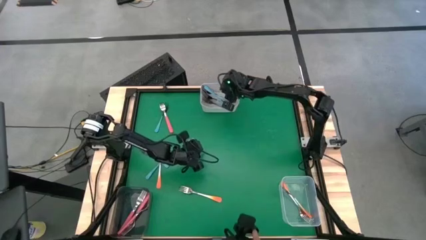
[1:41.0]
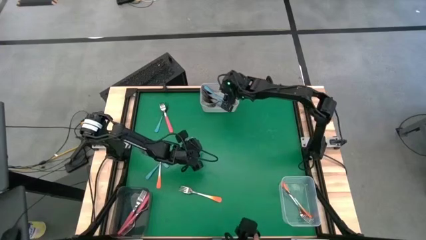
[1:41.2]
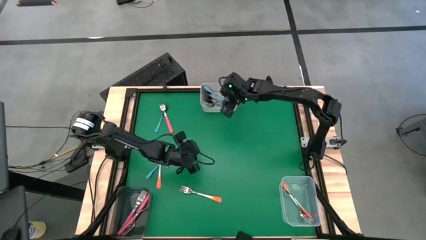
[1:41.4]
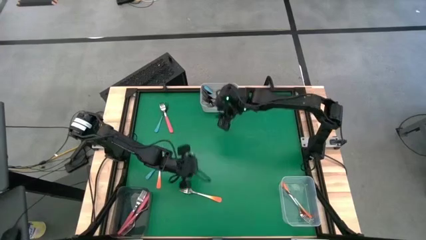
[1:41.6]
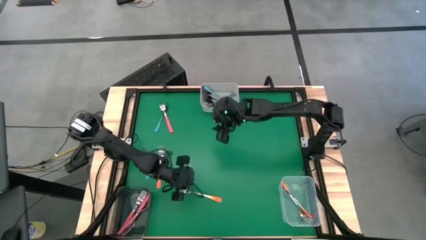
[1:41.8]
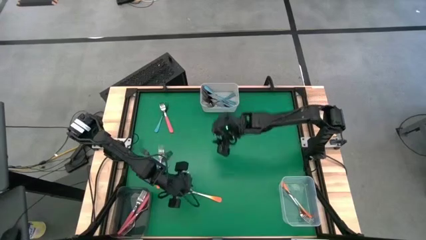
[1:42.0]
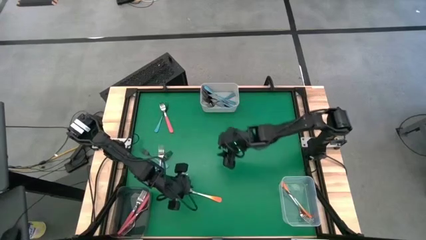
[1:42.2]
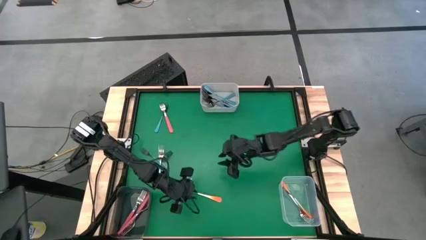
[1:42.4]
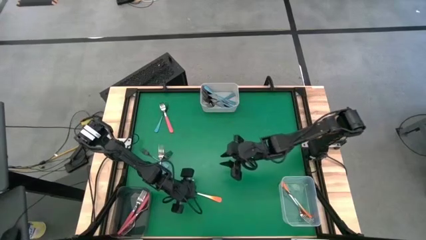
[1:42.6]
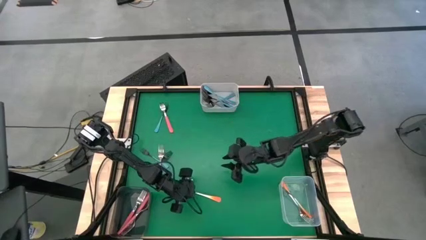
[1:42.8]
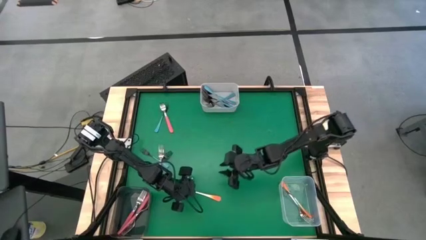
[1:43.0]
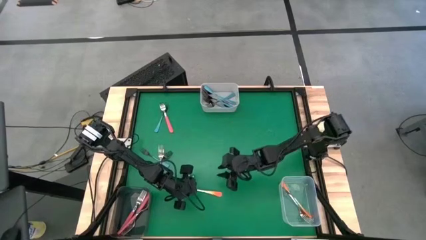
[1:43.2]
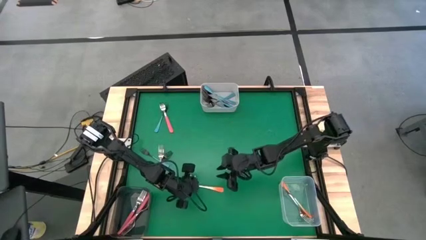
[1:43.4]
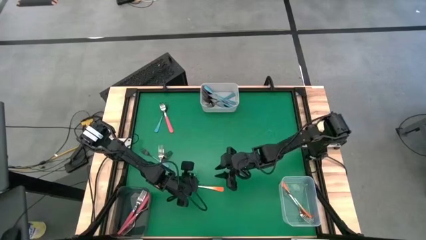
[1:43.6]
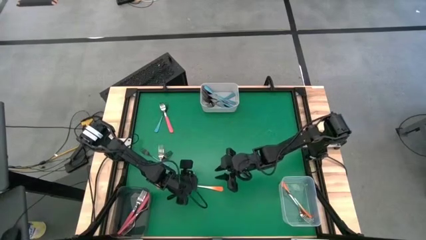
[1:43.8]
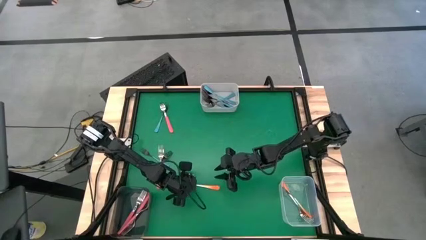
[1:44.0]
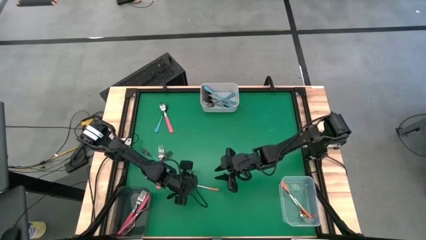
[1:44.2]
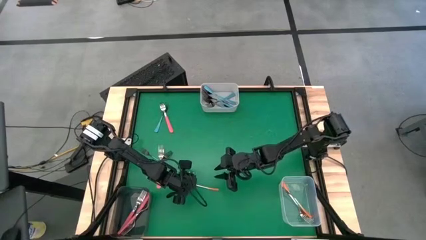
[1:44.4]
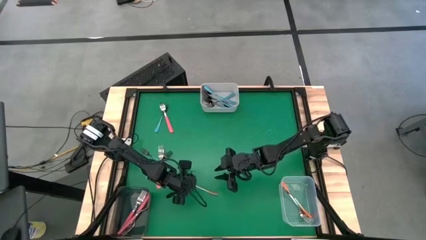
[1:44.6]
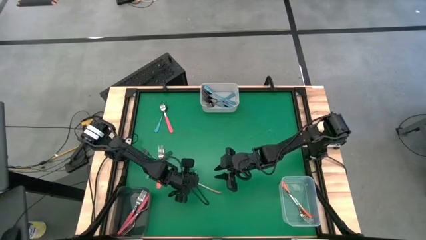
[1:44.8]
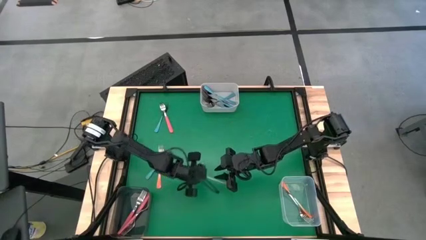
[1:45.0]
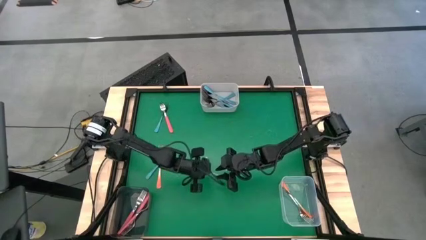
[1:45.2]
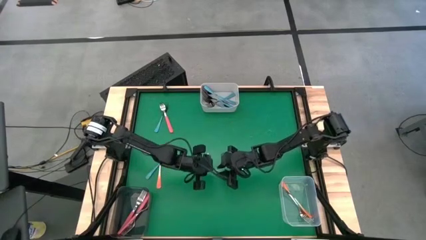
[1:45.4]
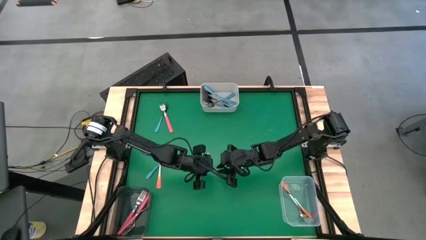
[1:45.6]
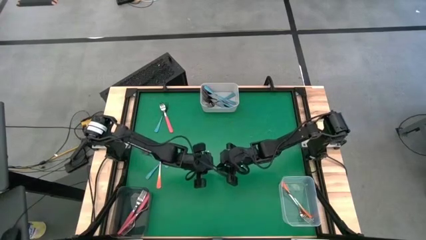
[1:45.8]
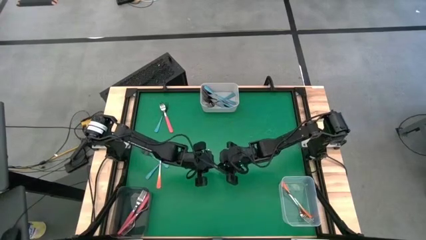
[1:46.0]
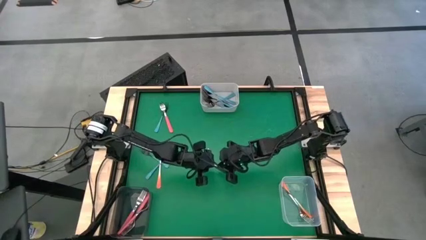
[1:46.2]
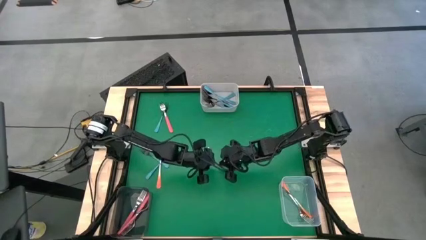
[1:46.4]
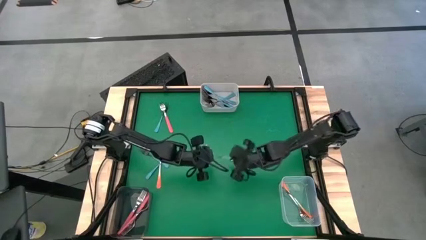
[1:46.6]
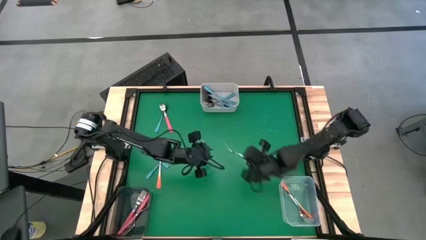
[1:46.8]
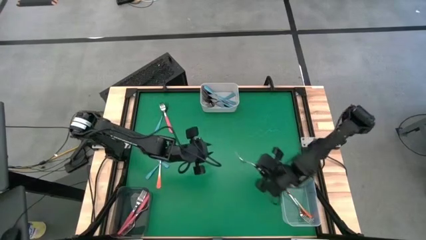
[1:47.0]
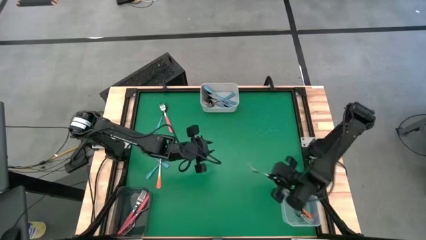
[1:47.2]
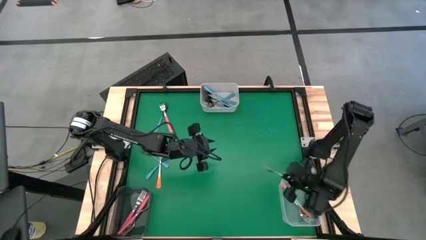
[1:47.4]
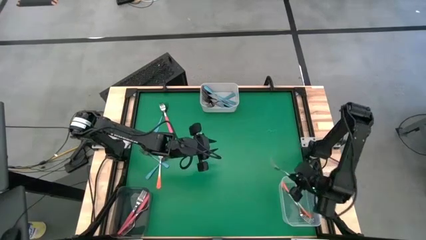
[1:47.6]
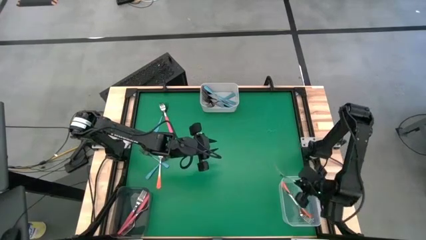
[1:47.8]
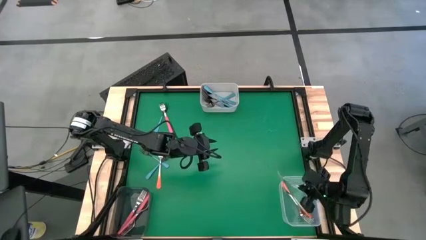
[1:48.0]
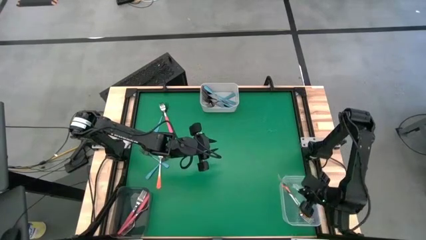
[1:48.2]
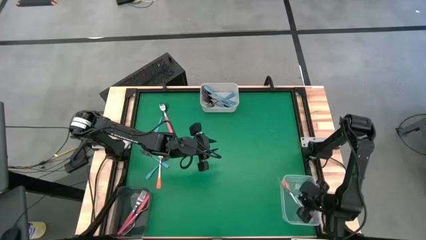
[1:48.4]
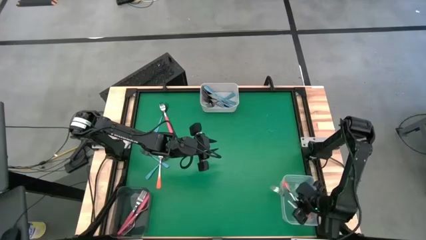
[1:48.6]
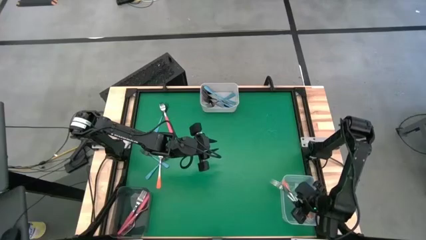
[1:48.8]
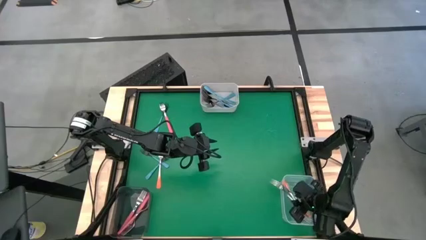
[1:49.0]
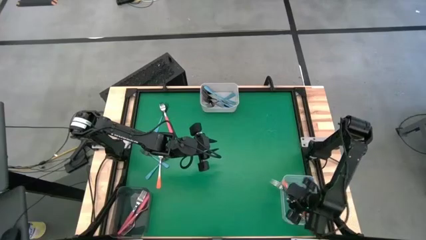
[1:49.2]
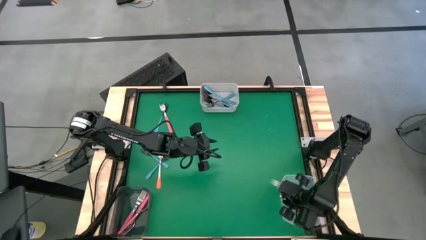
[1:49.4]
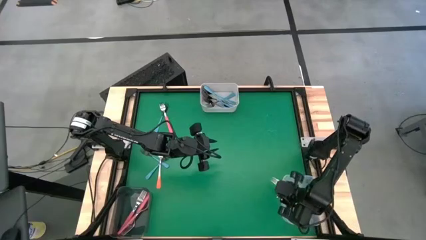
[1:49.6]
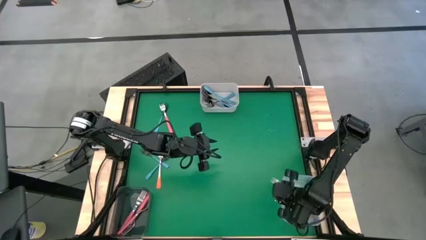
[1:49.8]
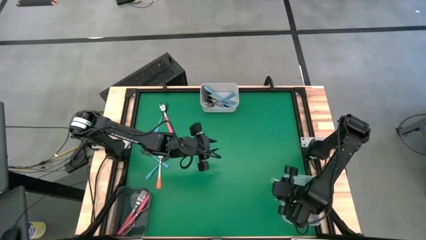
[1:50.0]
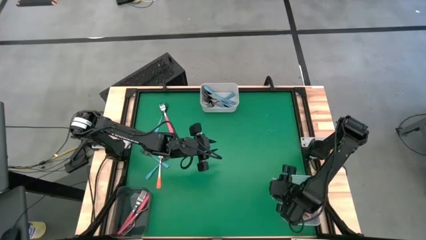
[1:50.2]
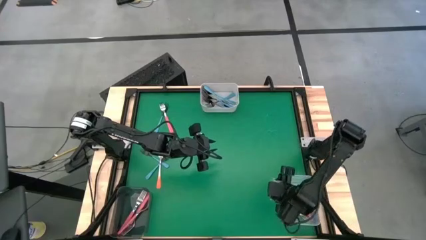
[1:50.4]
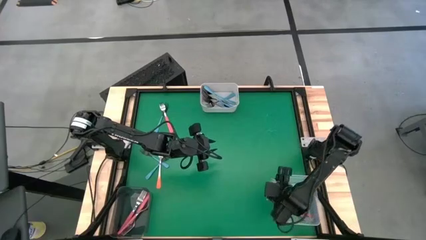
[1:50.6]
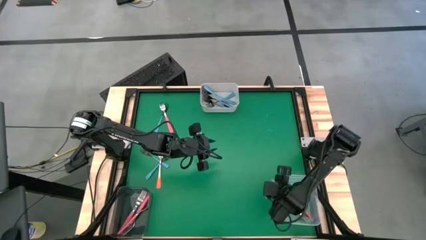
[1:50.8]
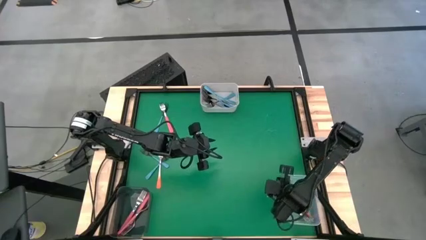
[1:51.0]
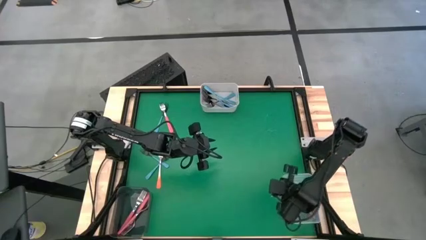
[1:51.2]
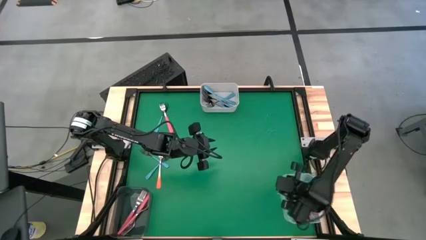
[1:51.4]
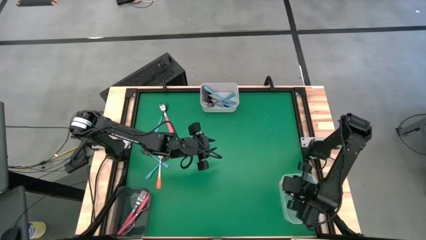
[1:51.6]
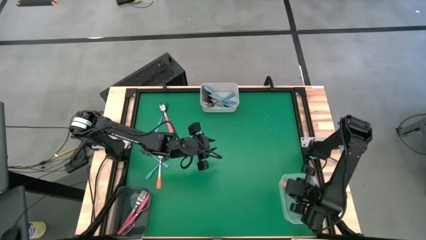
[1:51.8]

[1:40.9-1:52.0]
Task: Sort silverware by color (type)
Put the right orange fork into the transparent bin

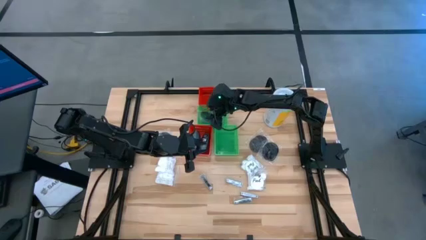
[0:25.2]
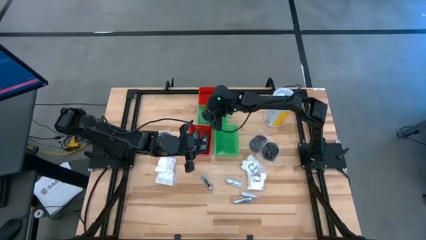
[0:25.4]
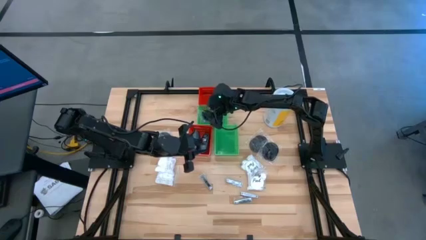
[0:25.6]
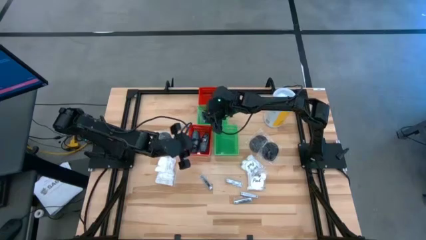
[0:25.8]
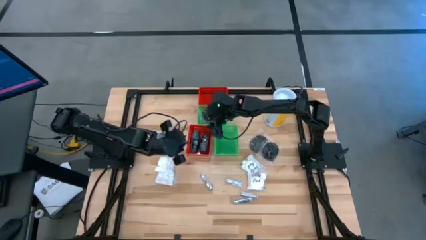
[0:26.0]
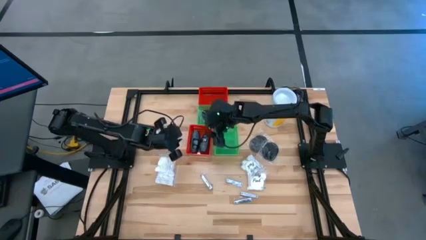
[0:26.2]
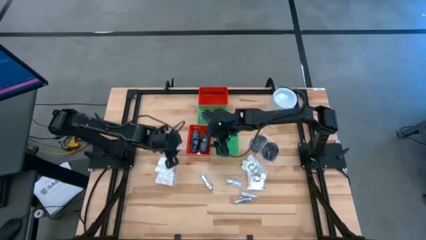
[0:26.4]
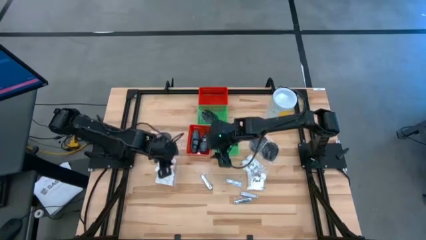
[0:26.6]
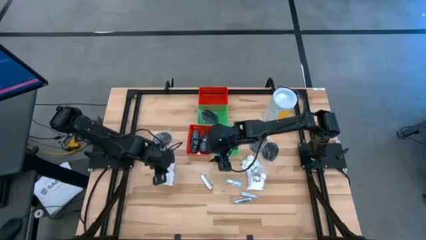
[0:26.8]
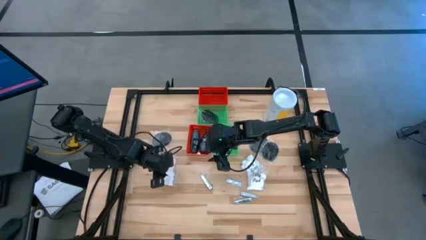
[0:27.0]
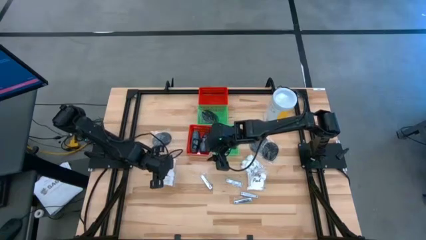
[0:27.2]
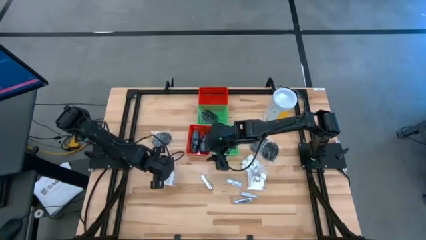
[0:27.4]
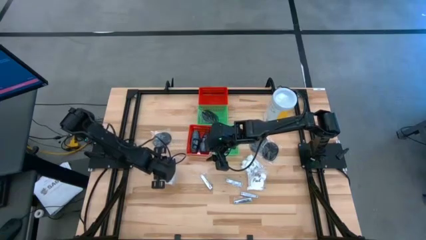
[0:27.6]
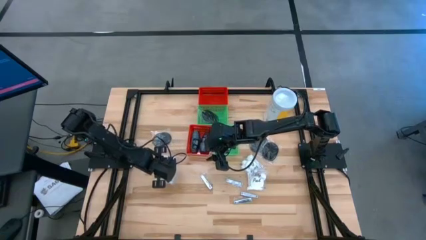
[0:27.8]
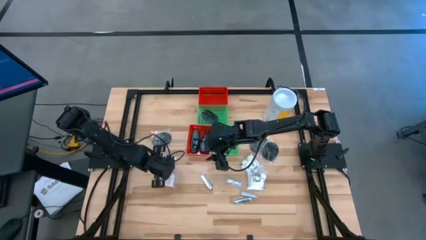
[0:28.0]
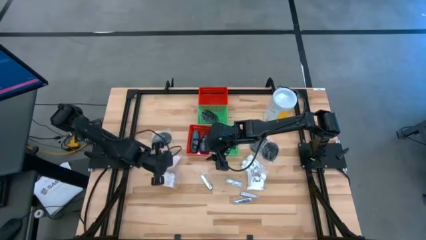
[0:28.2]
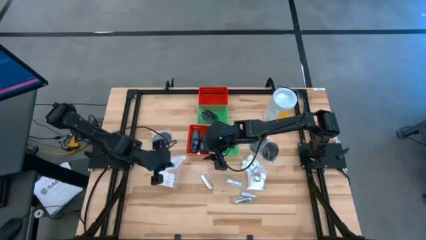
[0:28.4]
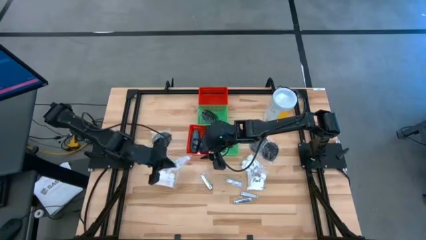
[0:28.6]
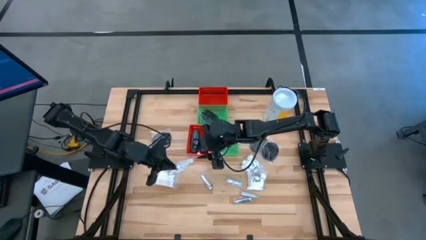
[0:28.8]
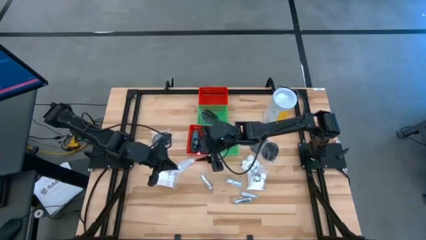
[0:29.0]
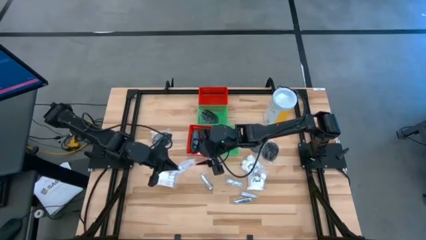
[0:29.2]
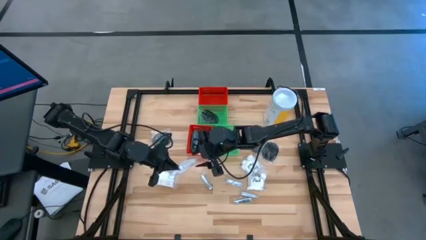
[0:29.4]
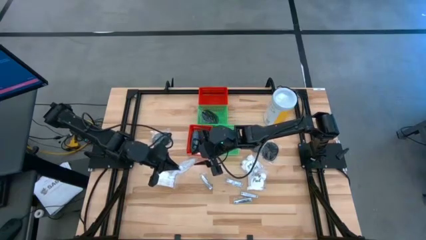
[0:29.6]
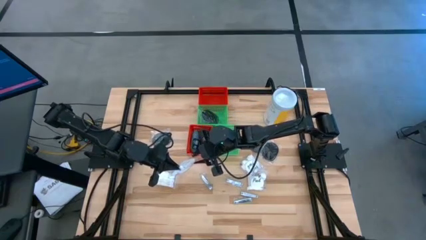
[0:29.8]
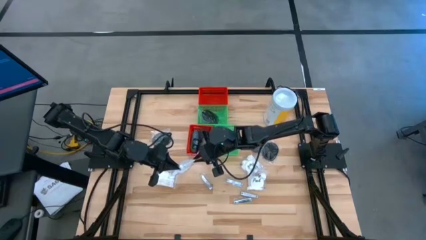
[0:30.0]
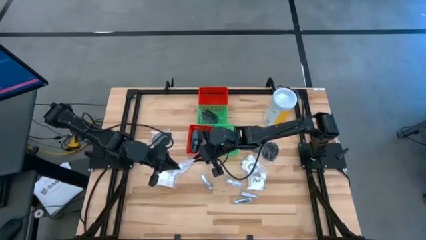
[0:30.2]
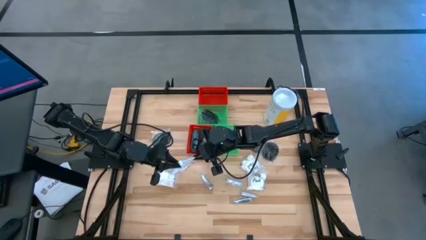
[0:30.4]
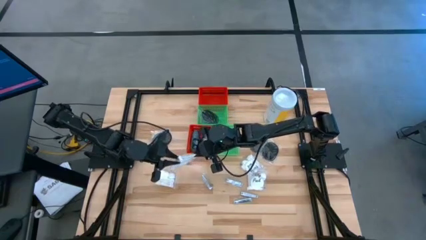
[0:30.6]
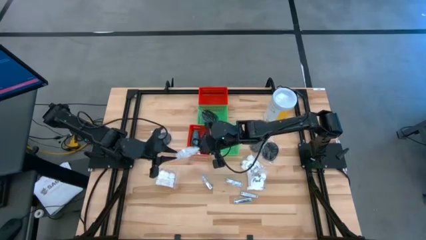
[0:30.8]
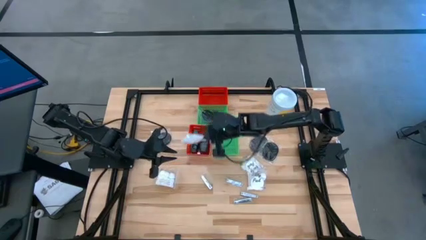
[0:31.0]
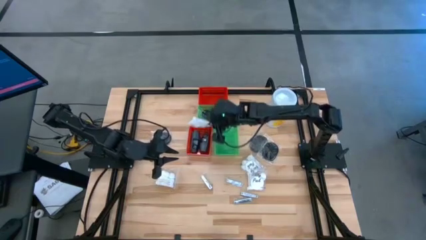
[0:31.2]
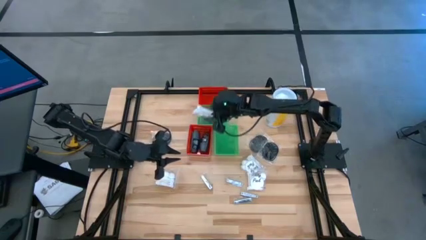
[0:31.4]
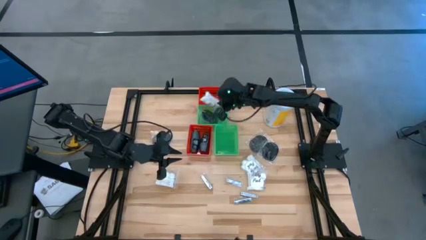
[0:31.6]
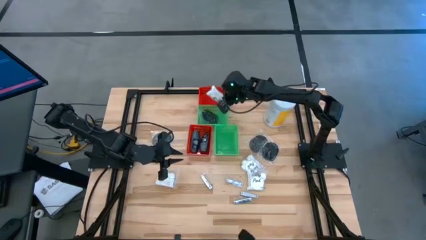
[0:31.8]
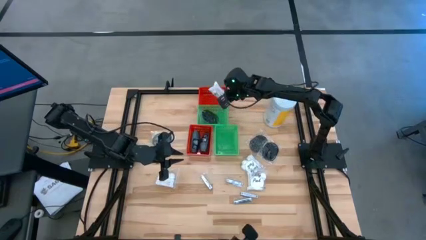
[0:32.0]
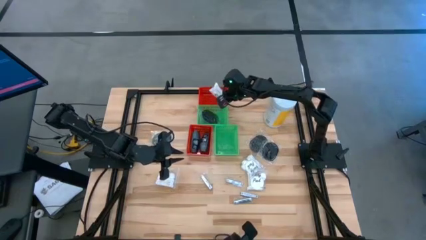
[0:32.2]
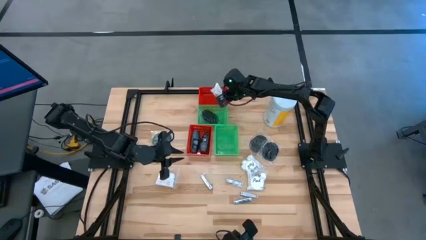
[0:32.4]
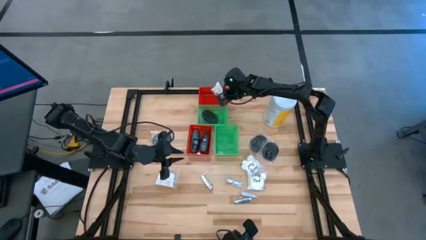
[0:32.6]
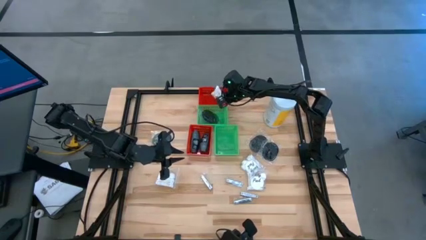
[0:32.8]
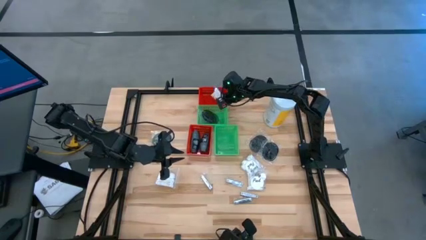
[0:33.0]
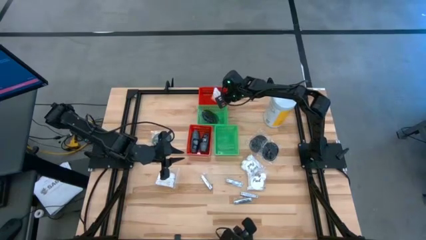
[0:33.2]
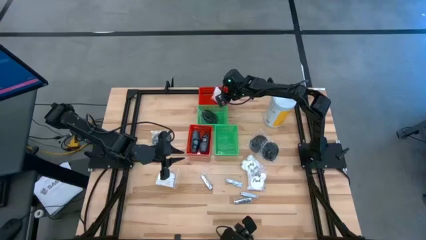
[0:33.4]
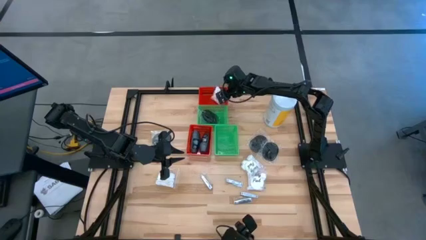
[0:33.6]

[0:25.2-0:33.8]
Task: Pick & Place Travel size toiletries
Put the white cotton pack into the top red bin
